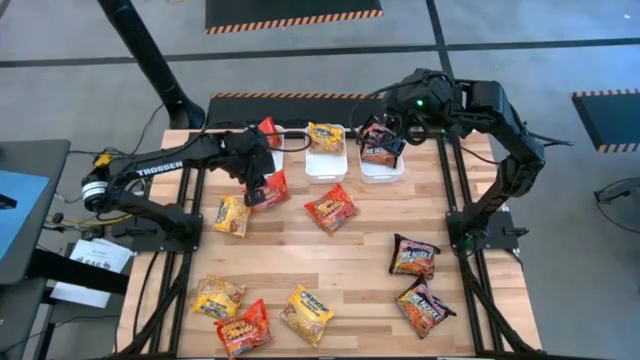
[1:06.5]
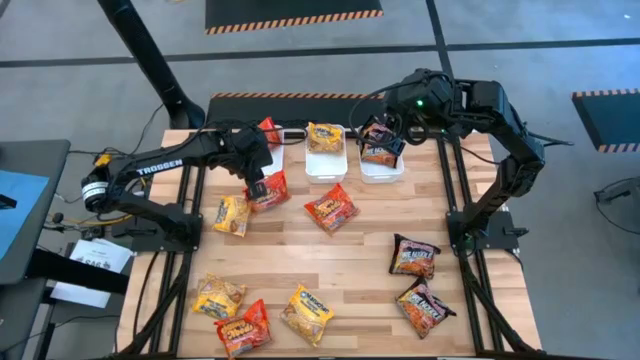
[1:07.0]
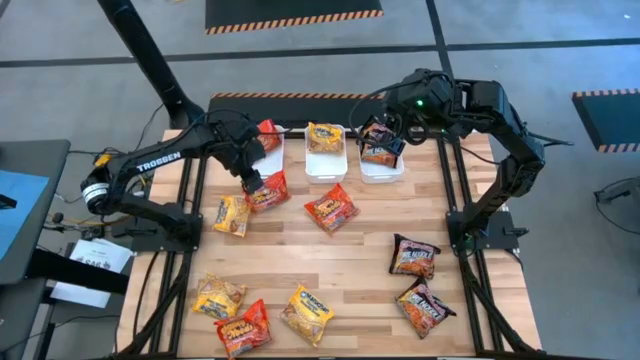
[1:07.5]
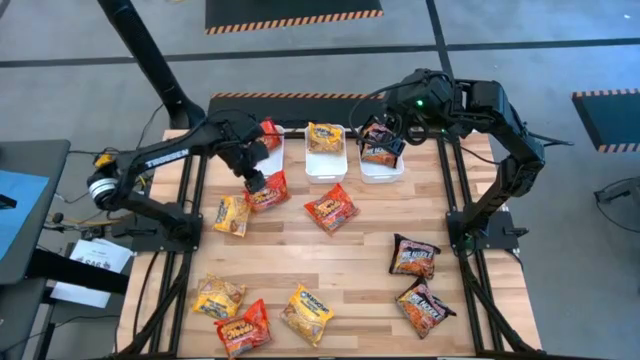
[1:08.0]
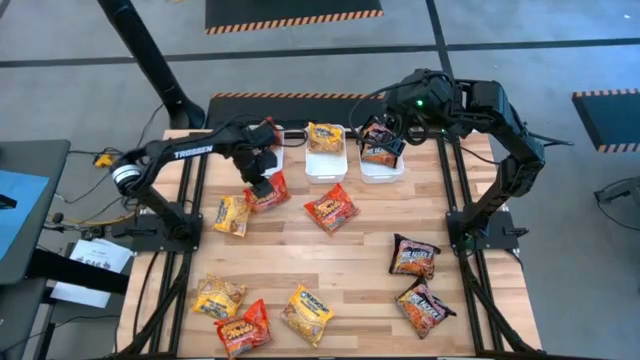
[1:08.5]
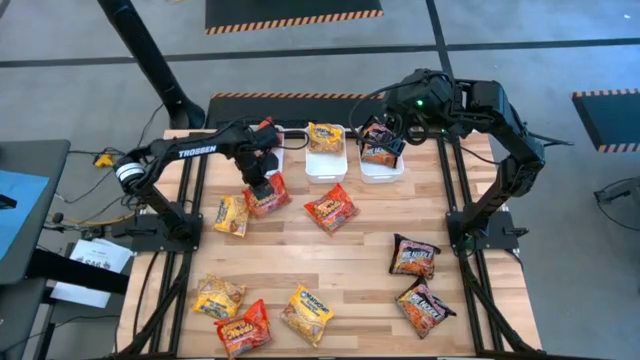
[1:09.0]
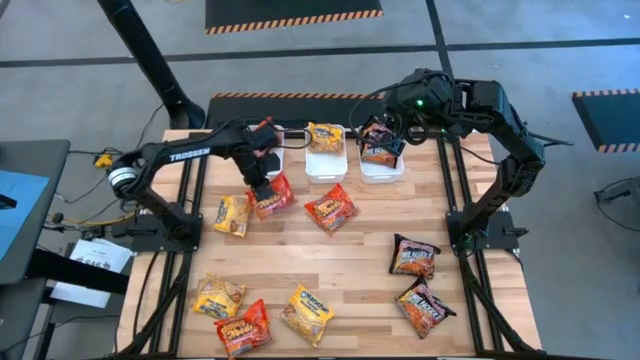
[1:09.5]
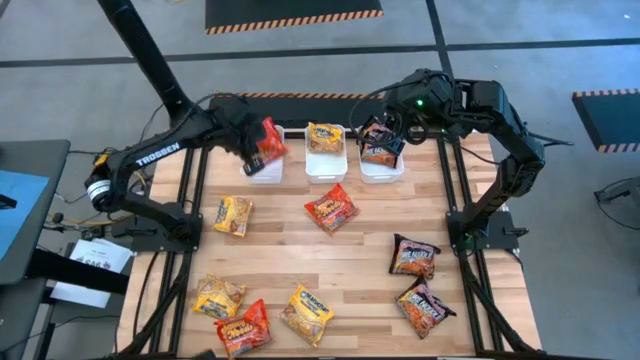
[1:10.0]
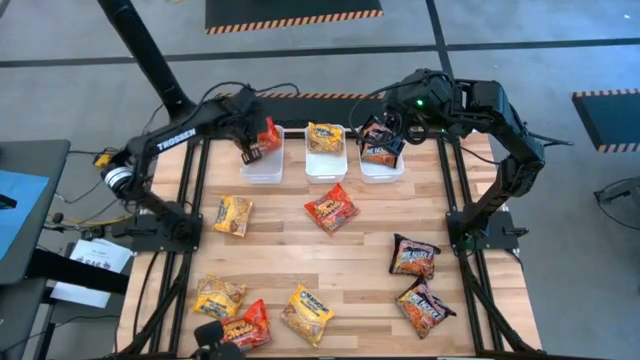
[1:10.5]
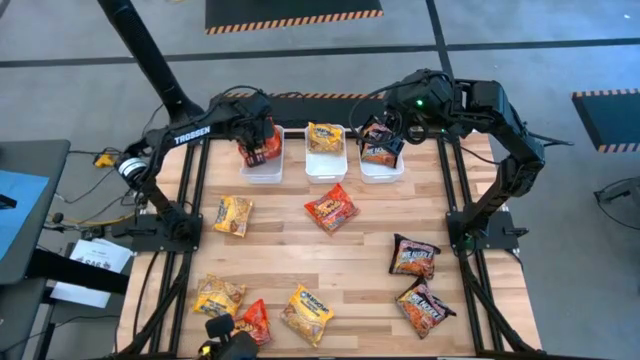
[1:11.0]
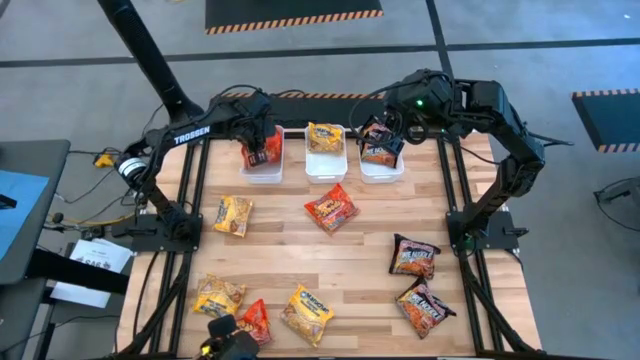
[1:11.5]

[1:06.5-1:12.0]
Task: Sort Maruchan noodles
Put the orange noodle pack into the left white bin

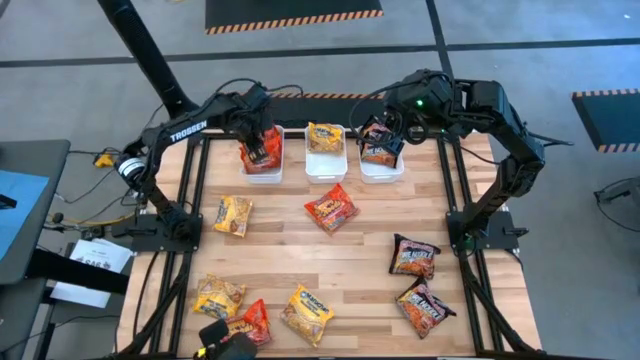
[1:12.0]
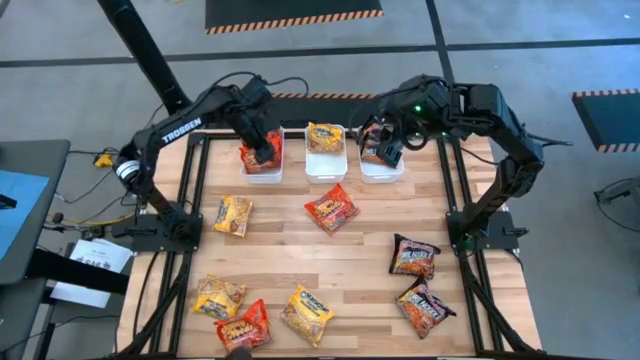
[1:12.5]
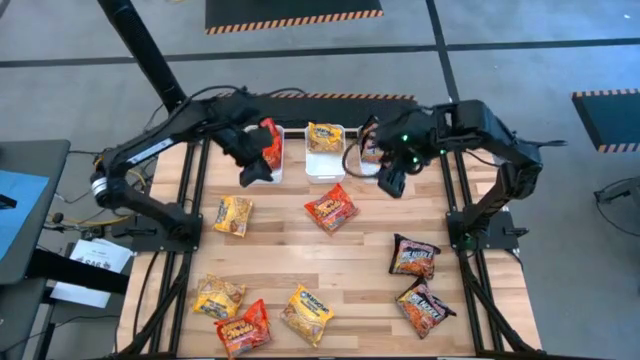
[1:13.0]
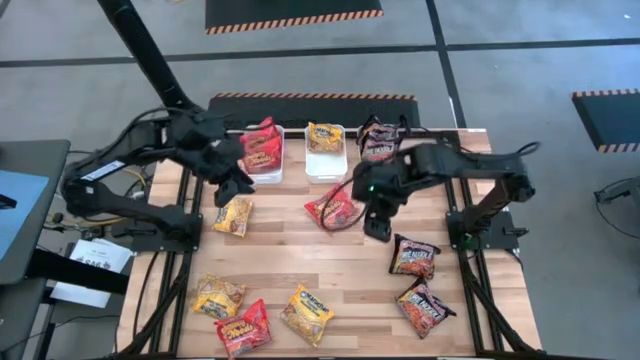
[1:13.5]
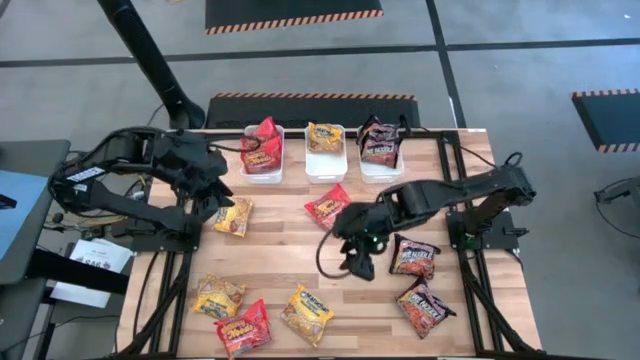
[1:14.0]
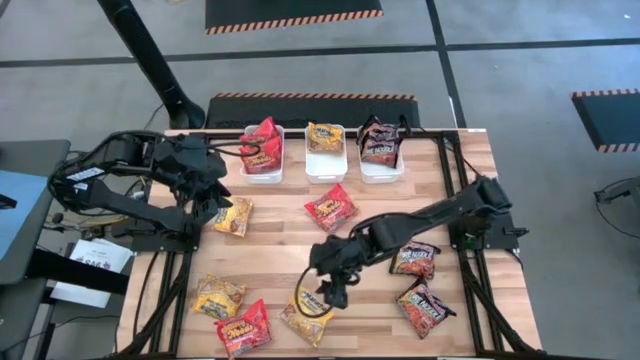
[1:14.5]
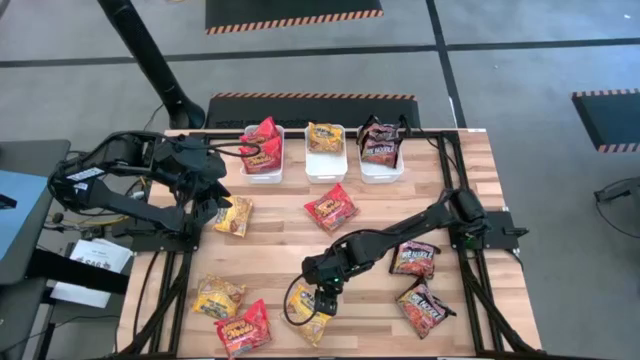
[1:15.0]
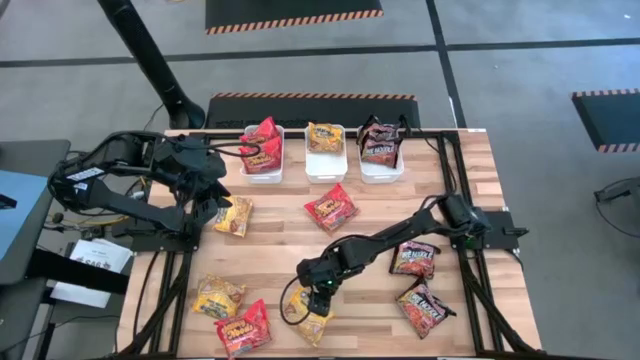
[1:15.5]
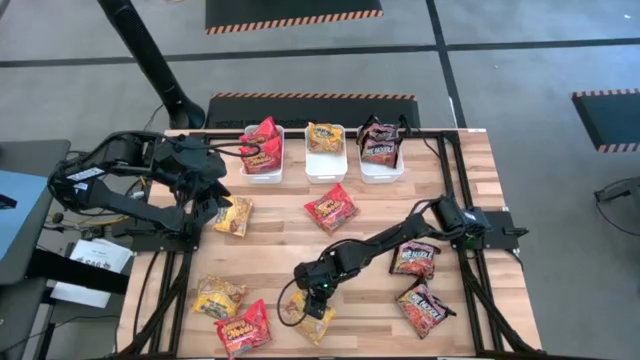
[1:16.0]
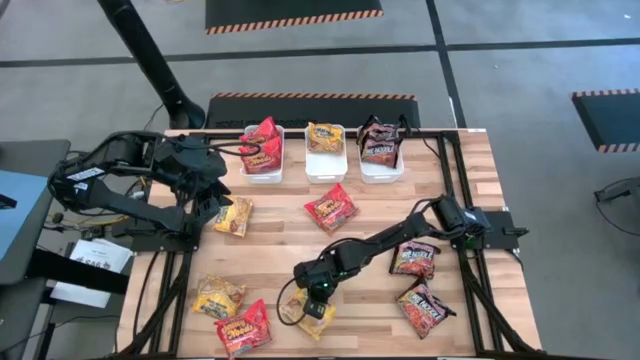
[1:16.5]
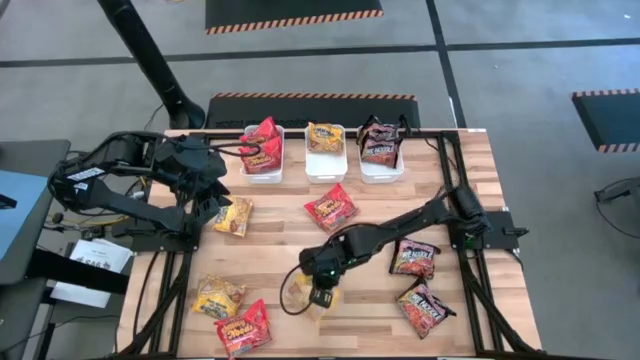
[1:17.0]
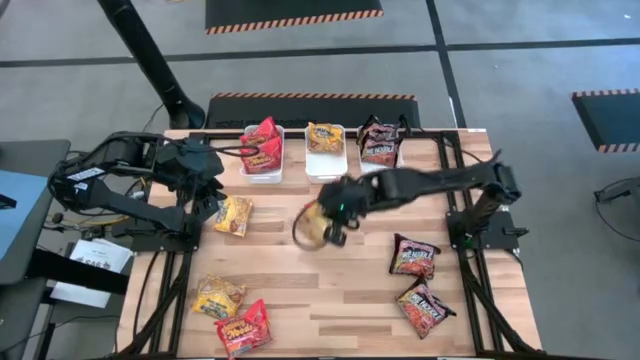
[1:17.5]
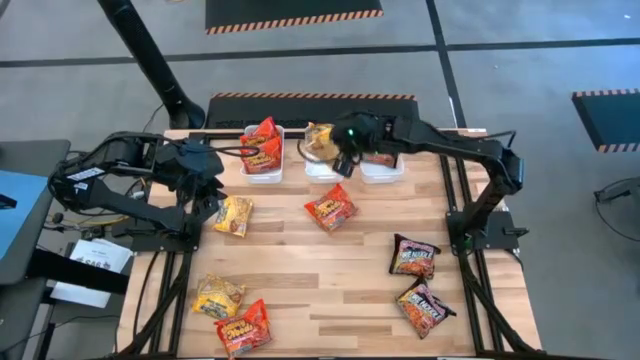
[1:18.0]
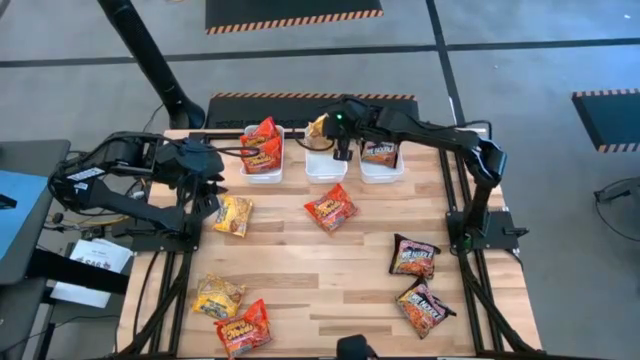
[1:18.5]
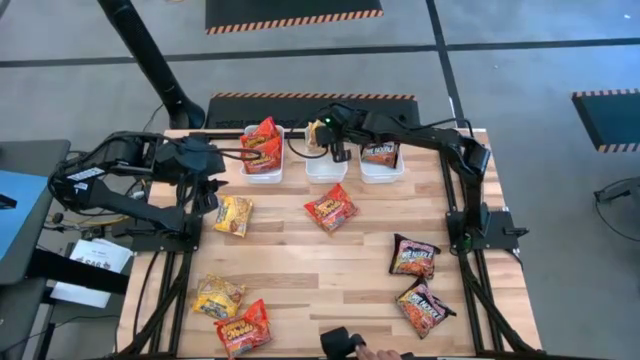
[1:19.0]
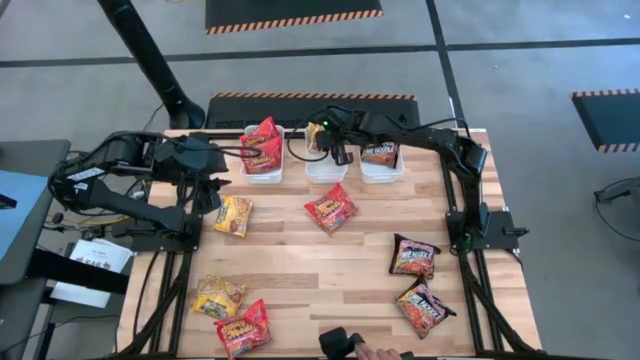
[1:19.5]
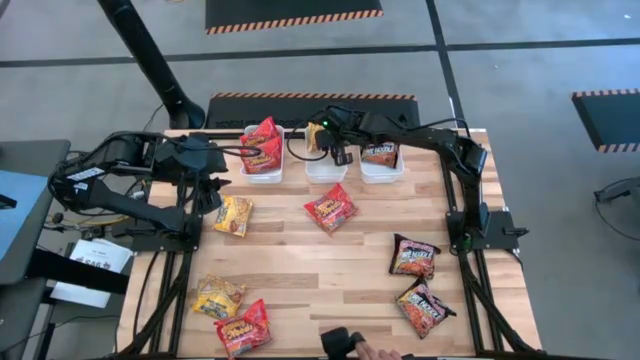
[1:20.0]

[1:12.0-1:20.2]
Put the yellow noodle pack into the middle white bin

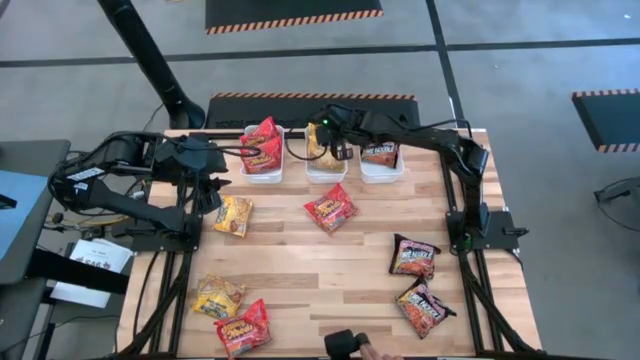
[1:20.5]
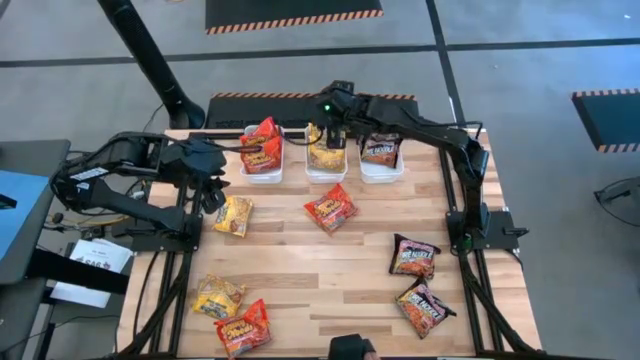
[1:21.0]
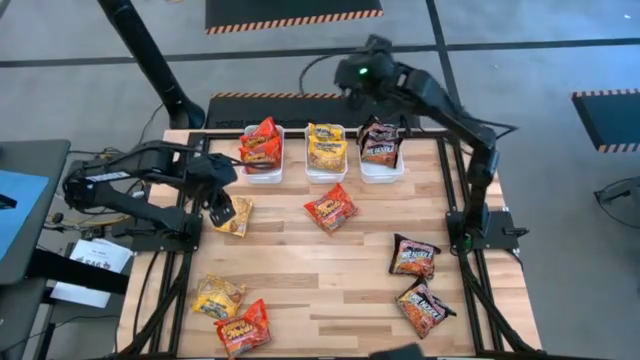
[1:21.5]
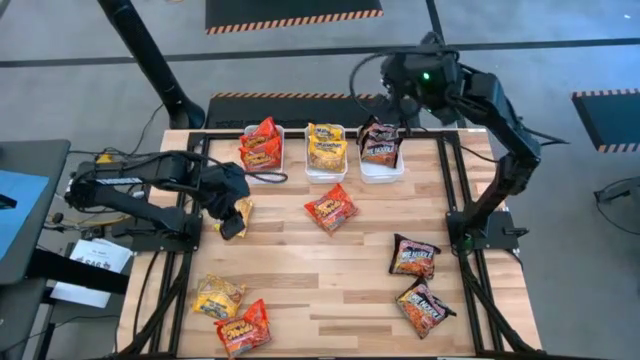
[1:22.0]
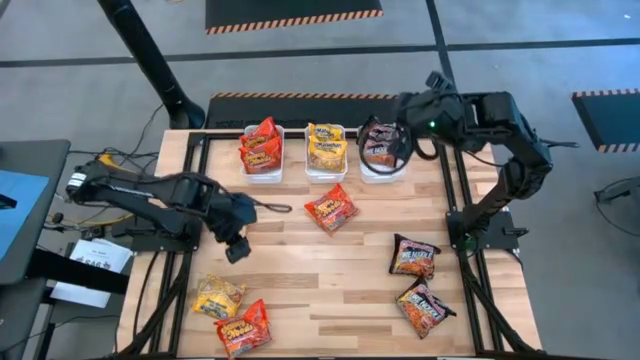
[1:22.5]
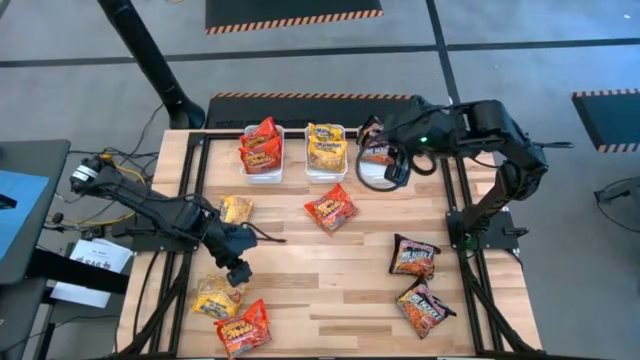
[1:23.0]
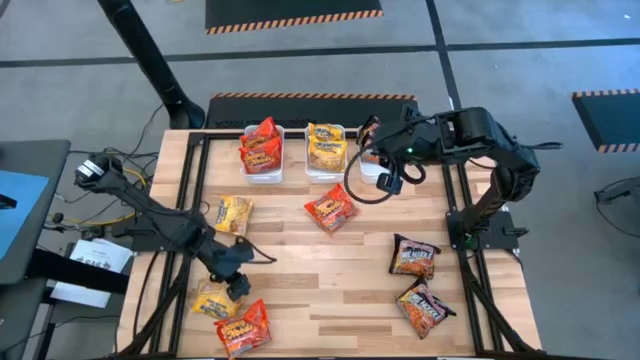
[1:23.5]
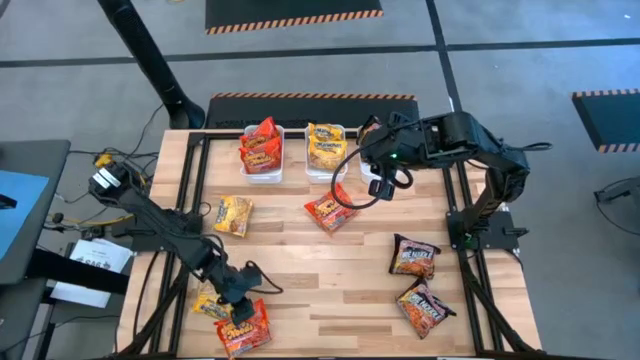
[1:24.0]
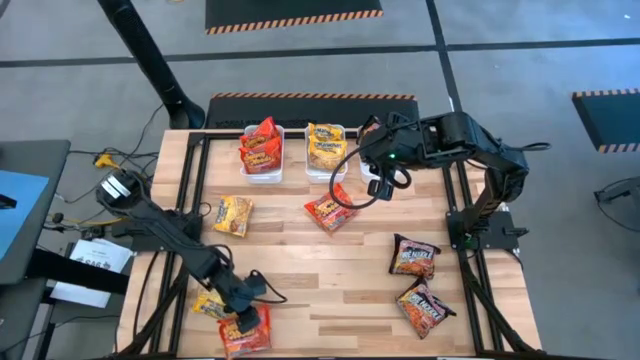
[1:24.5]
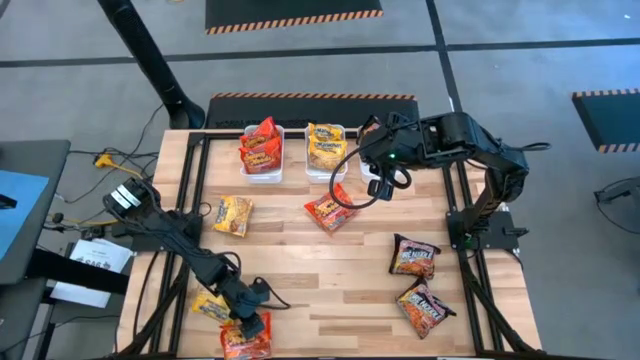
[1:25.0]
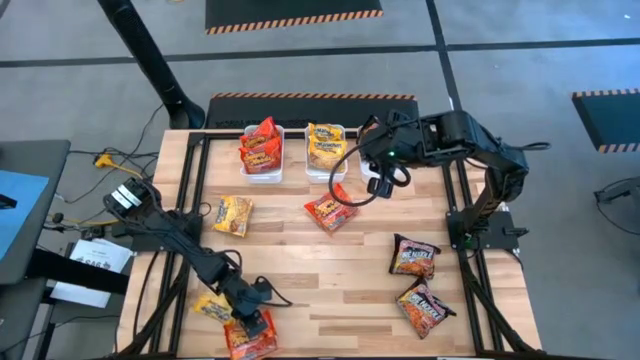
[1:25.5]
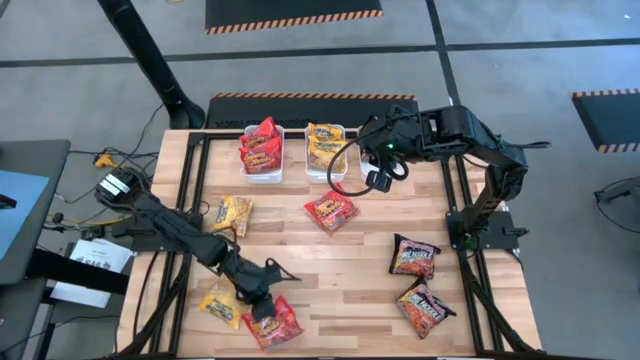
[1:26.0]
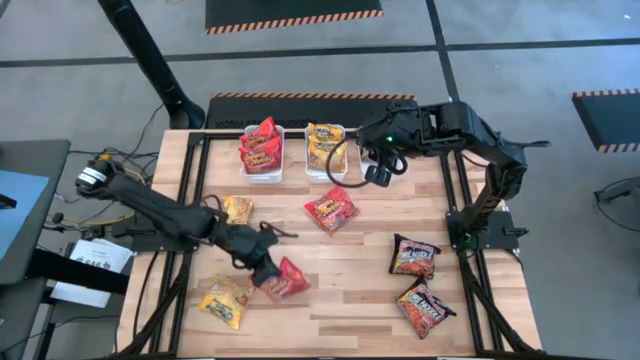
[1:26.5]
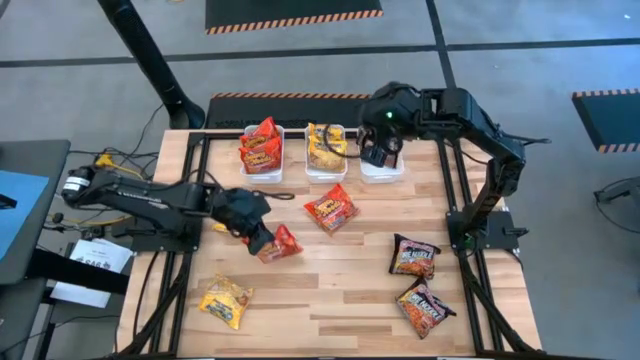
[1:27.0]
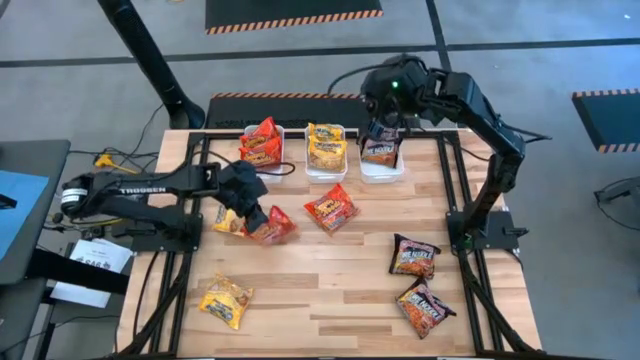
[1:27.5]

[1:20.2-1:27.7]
Put the orange noodle pack into the left white bin
